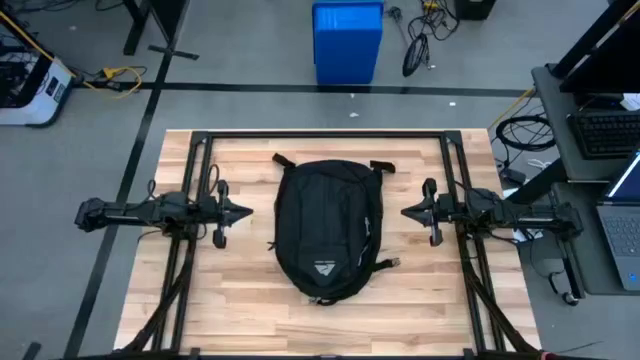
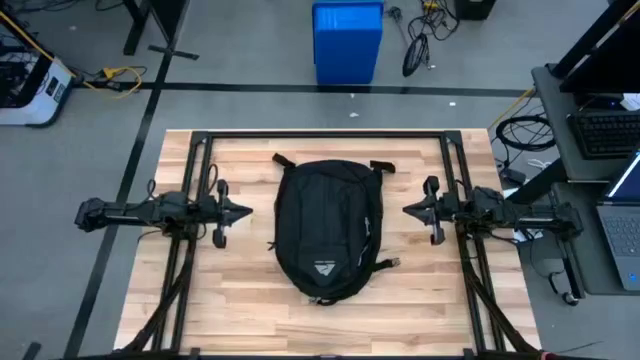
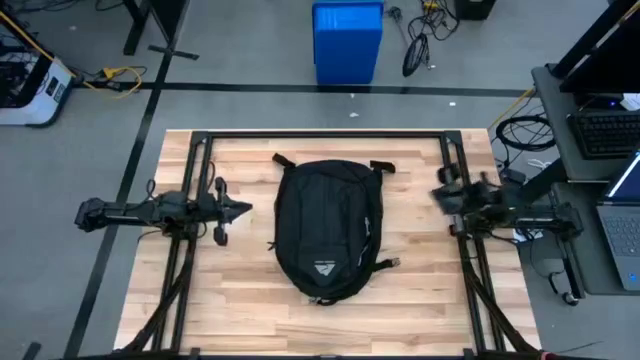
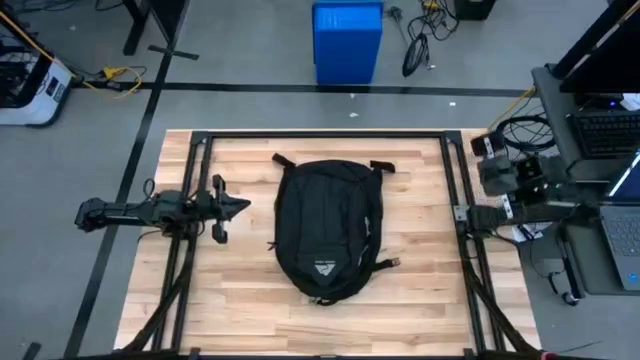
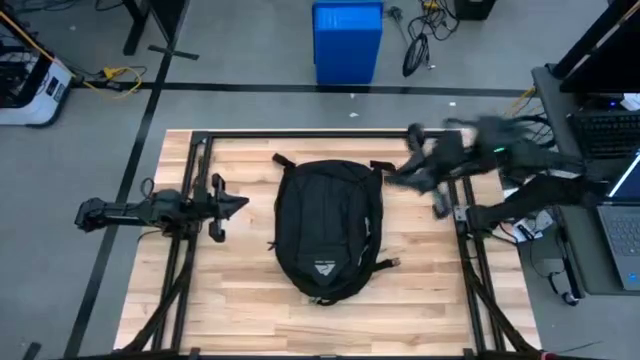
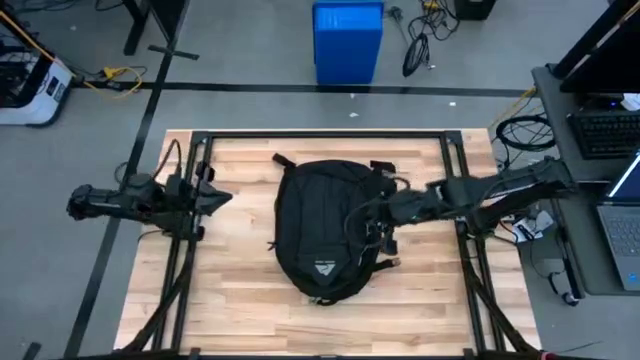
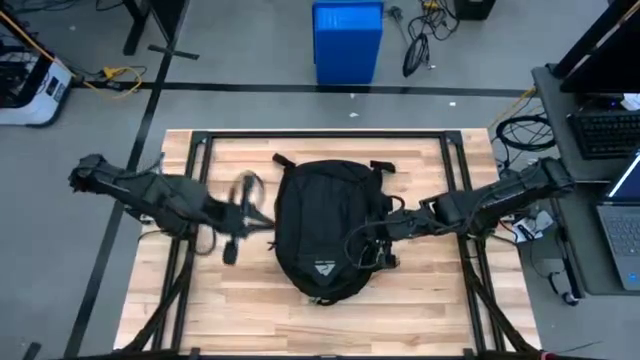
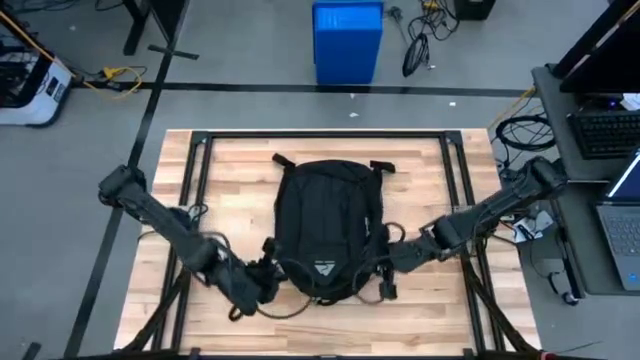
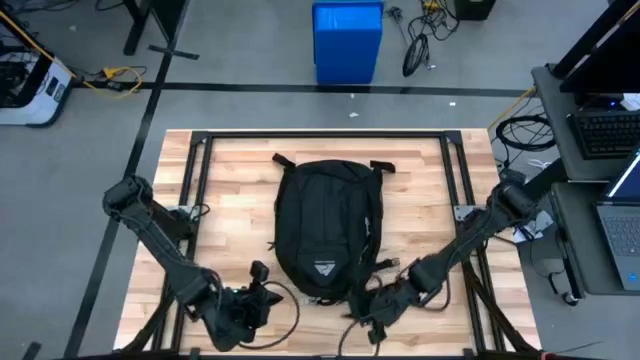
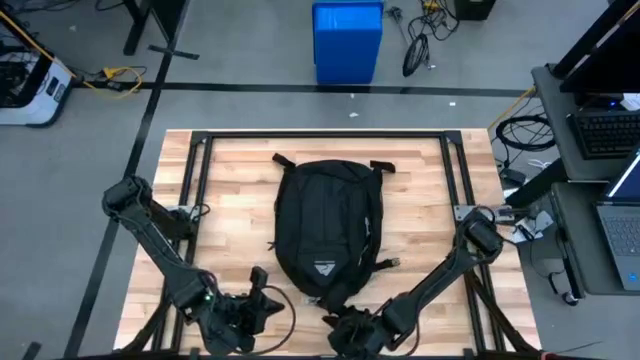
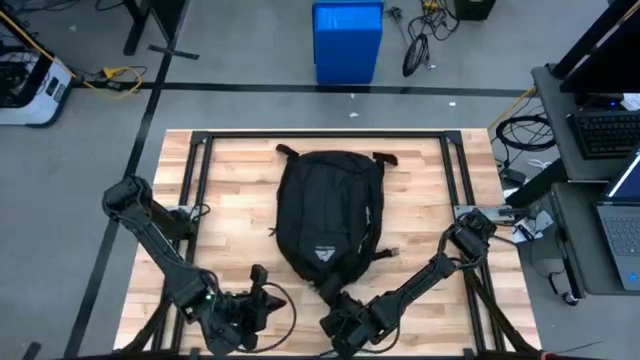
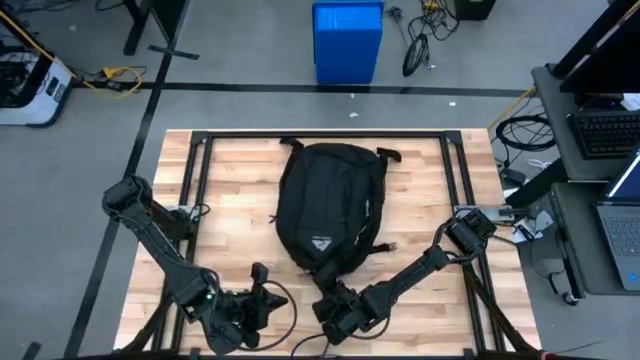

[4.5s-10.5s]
Task: Unpack backpack
Open the black backpack

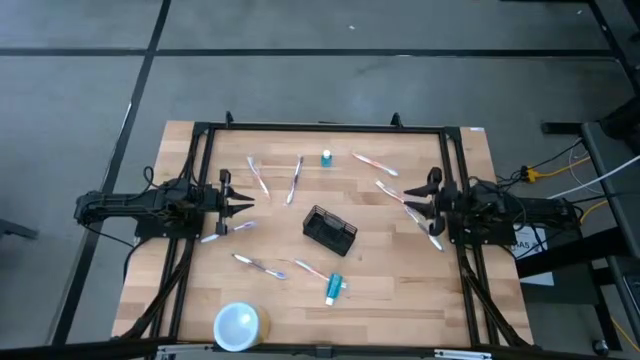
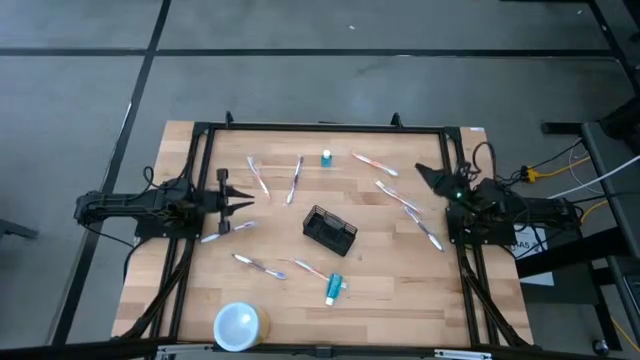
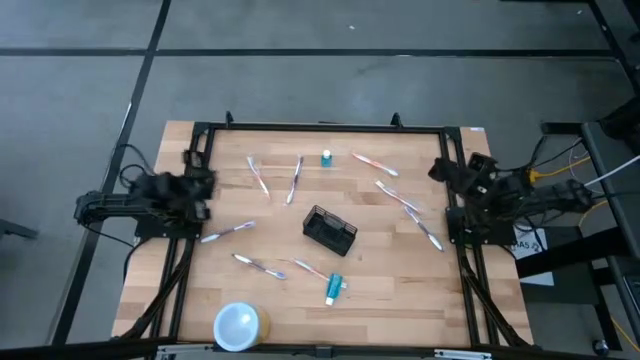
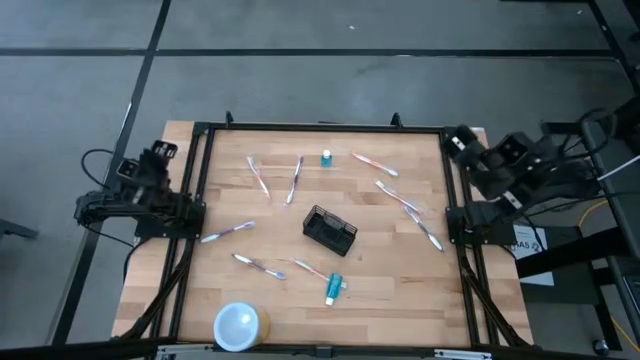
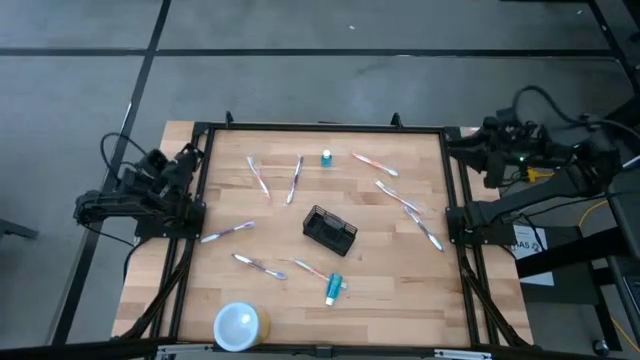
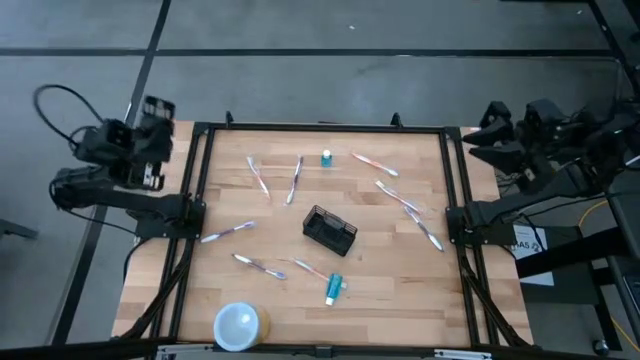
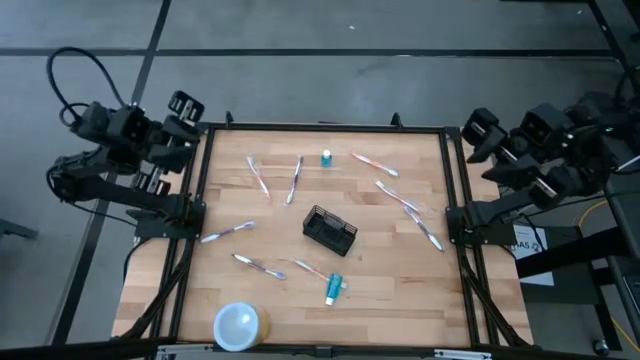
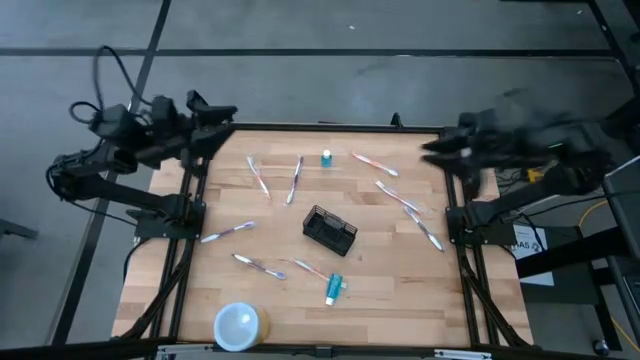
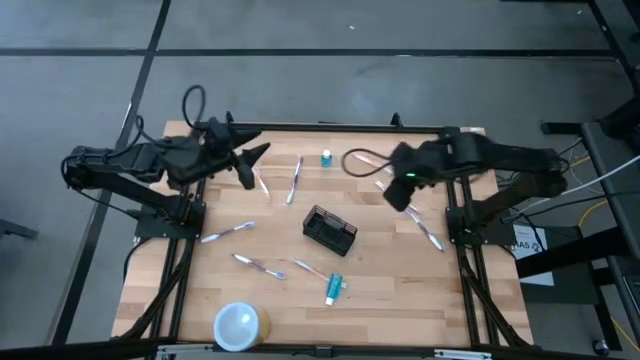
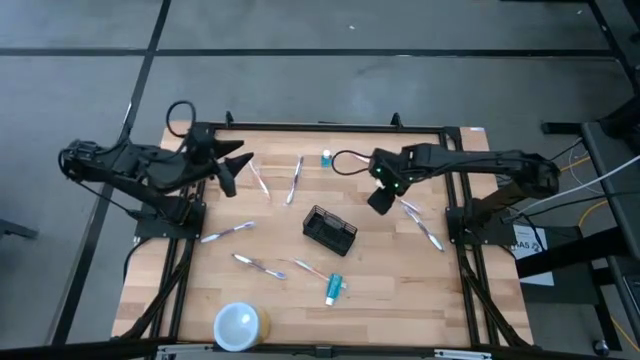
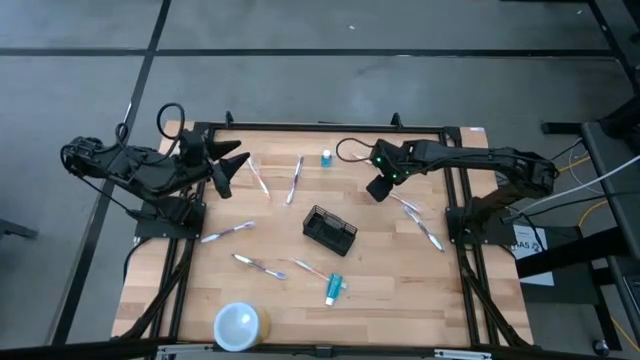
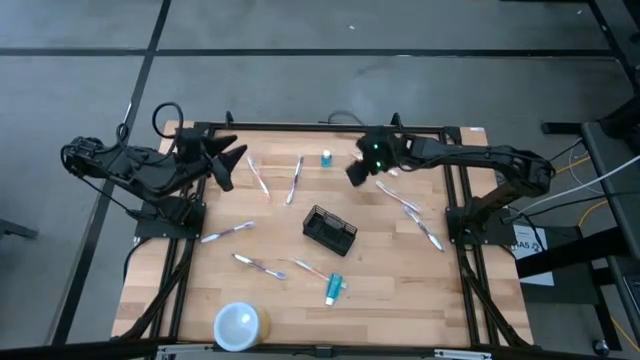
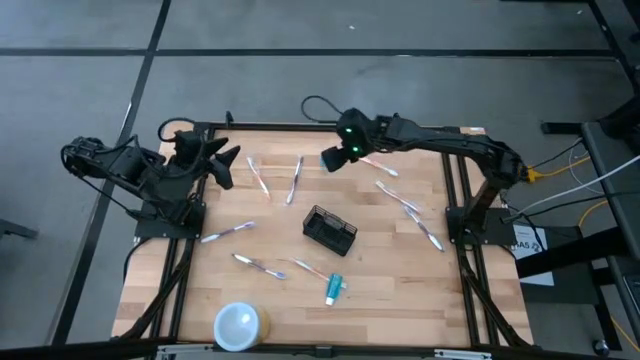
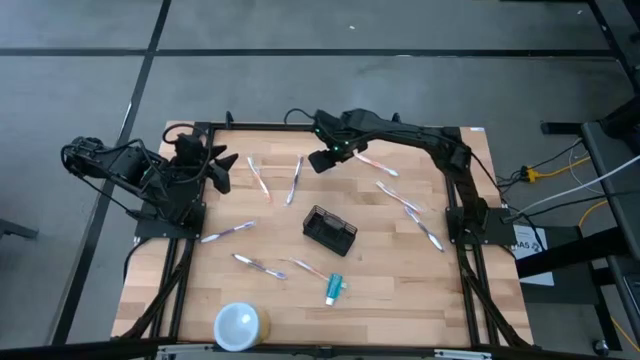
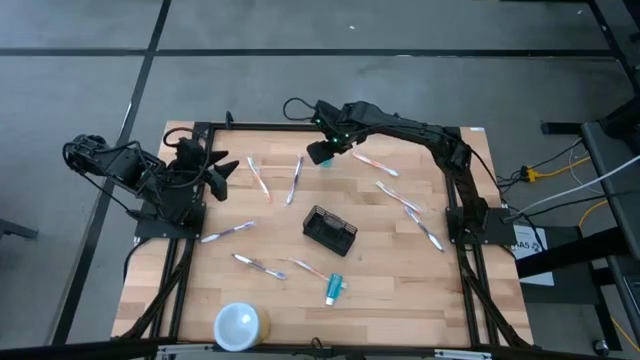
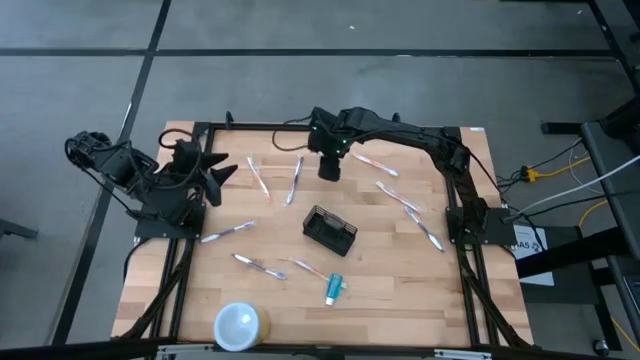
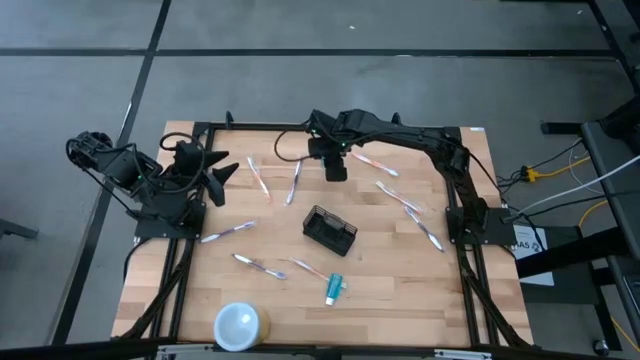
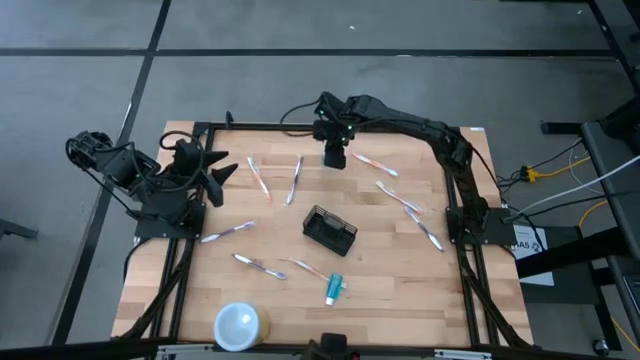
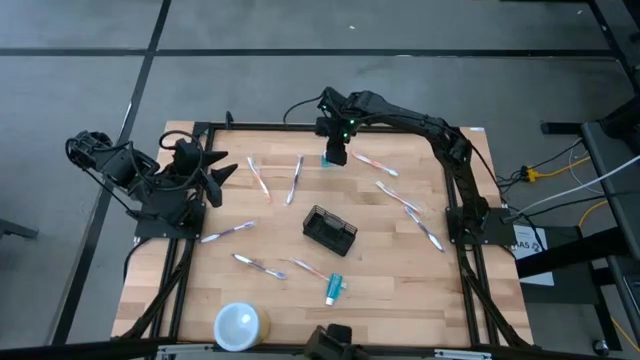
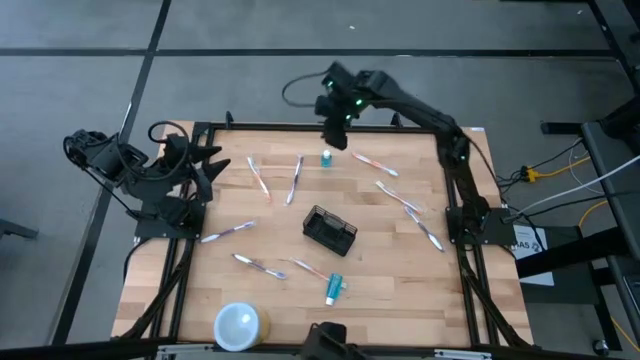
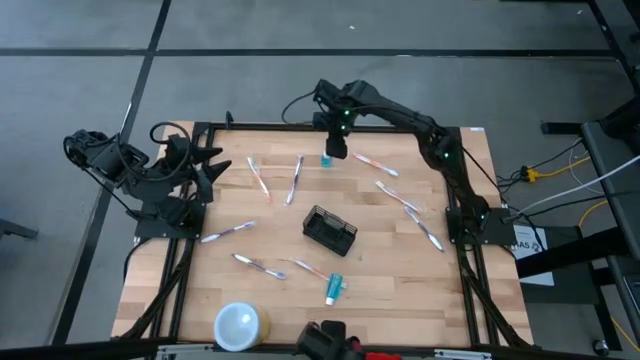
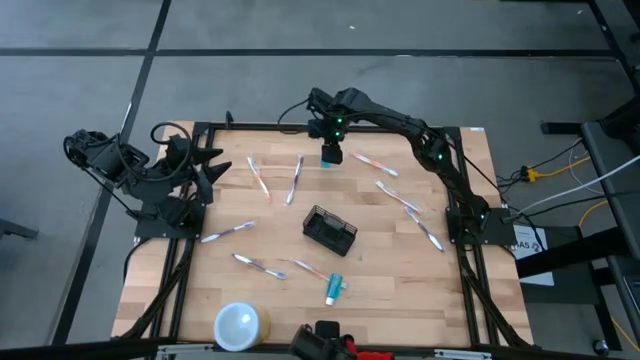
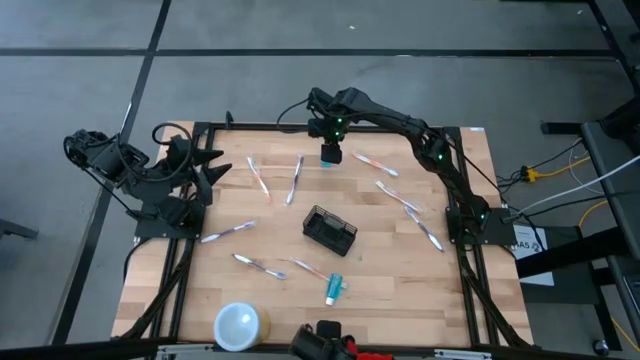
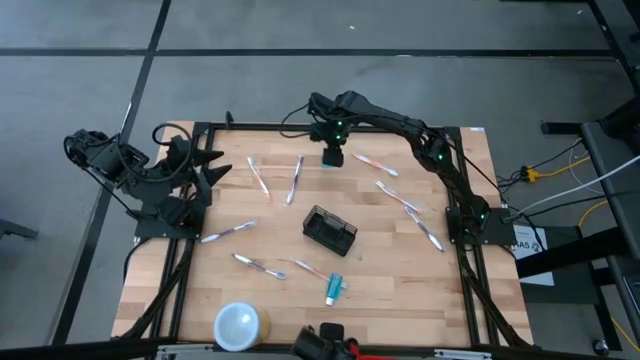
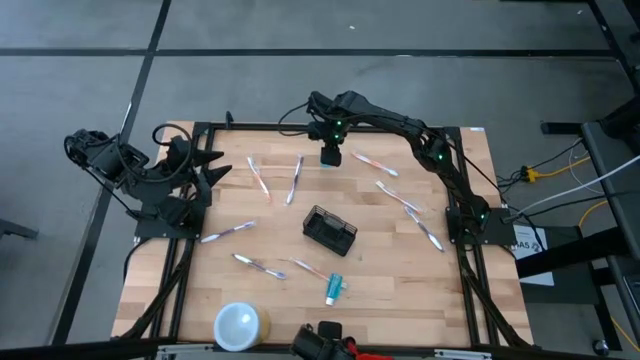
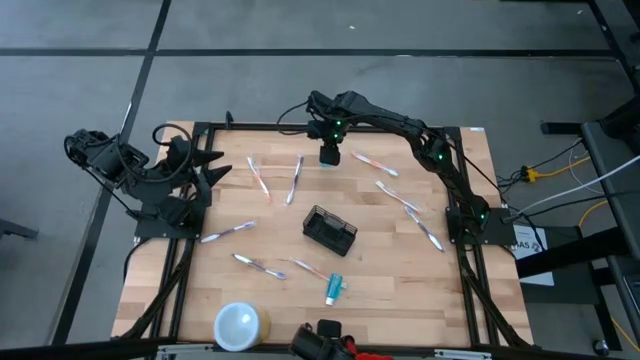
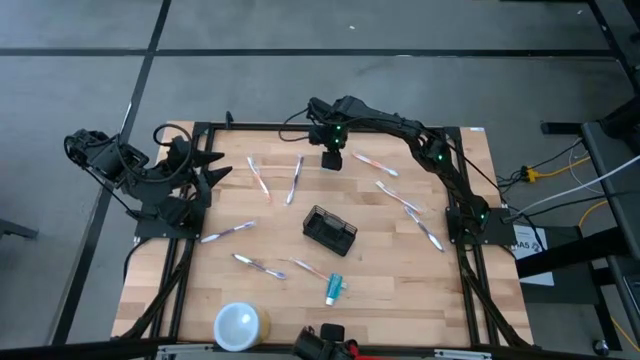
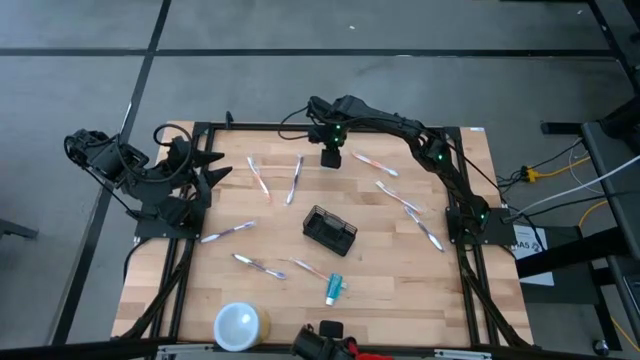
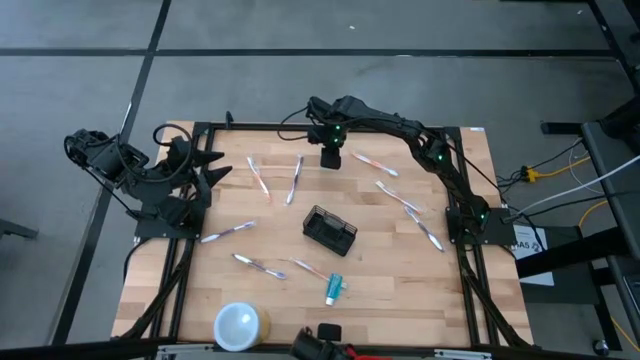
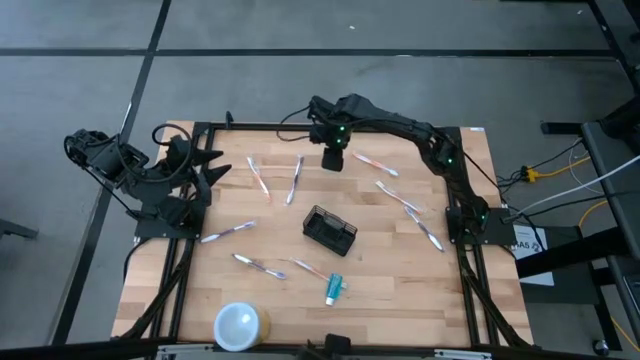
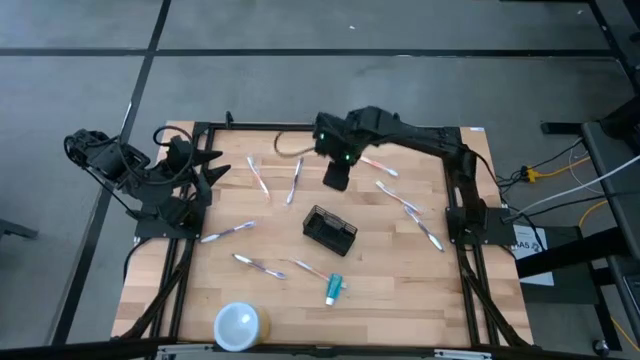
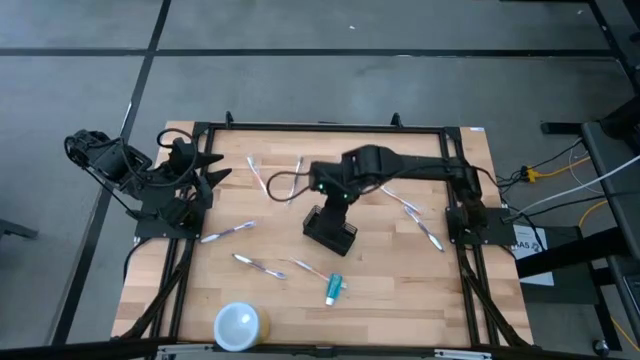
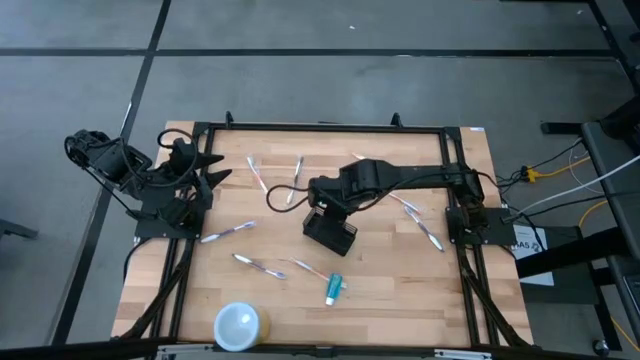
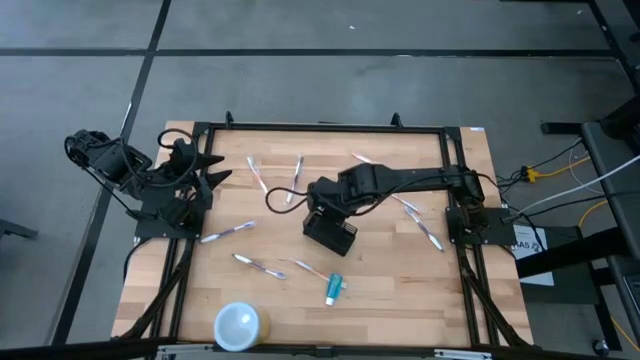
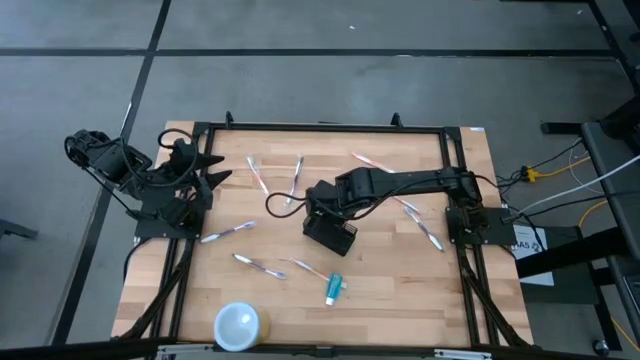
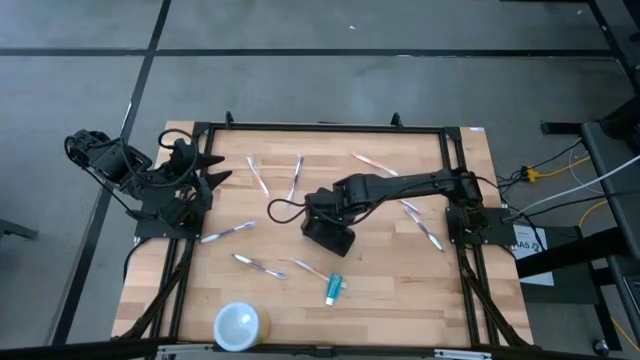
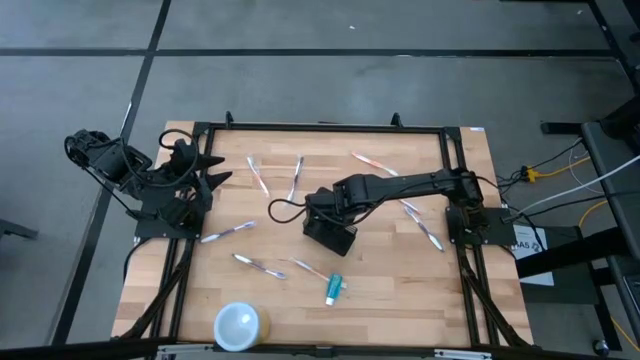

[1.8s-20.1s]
Task: Pick & Place toothbrushing station
Put the blue mouthwash into the wire organizer
